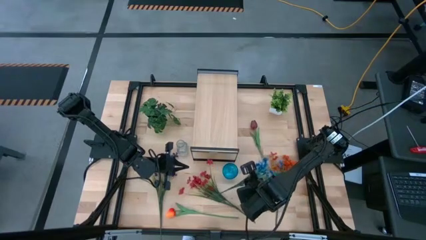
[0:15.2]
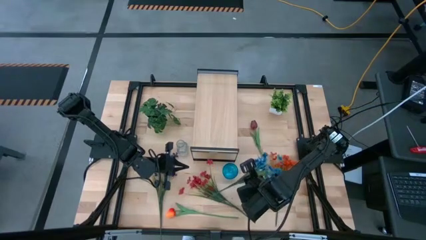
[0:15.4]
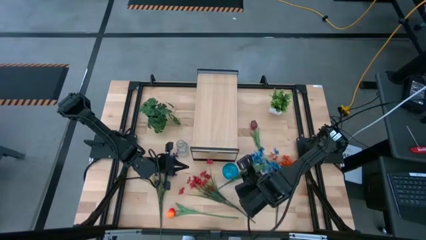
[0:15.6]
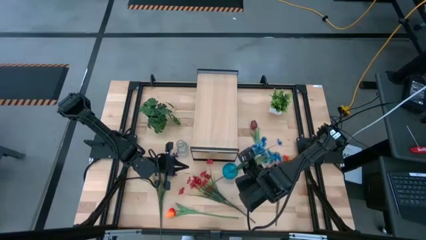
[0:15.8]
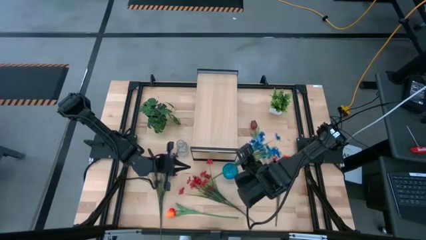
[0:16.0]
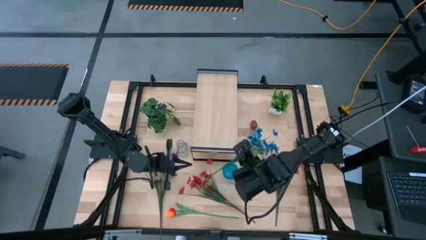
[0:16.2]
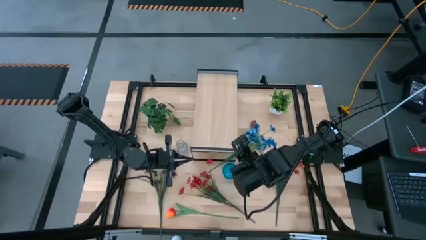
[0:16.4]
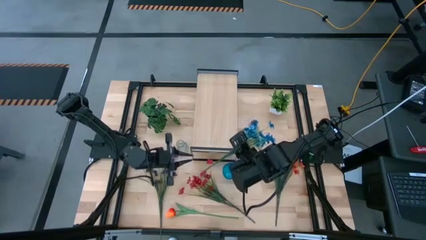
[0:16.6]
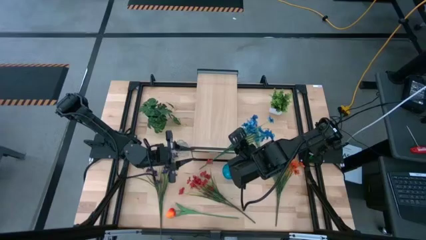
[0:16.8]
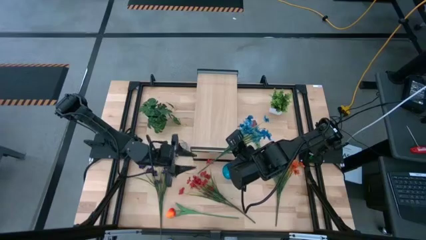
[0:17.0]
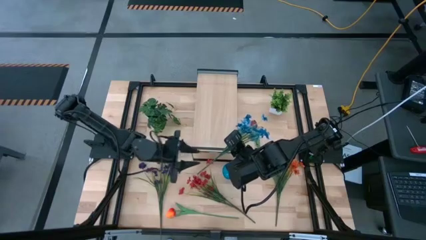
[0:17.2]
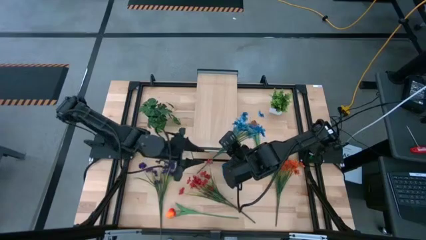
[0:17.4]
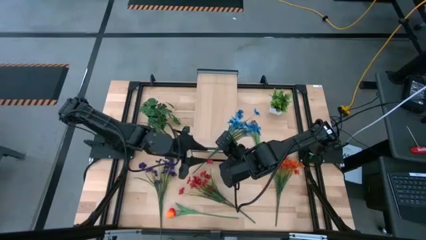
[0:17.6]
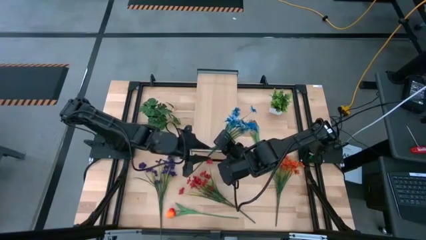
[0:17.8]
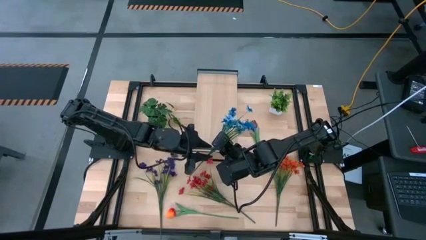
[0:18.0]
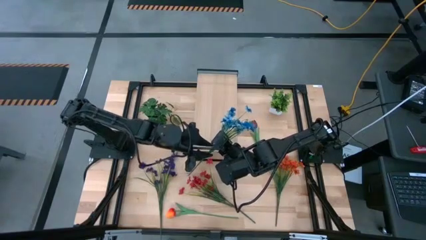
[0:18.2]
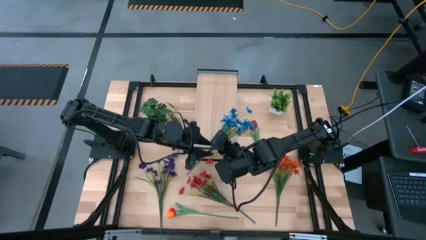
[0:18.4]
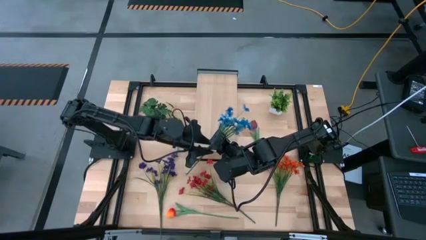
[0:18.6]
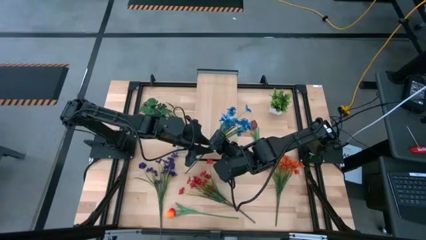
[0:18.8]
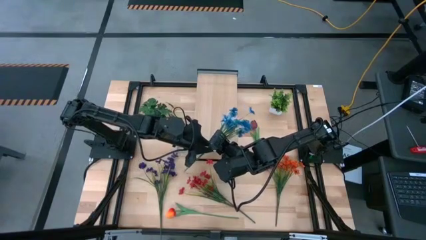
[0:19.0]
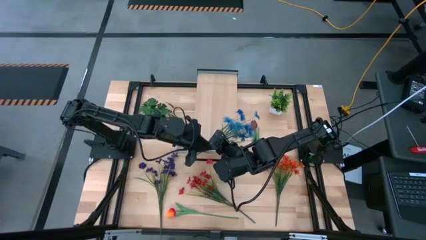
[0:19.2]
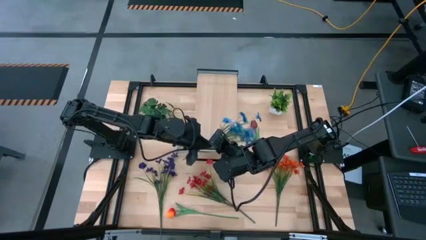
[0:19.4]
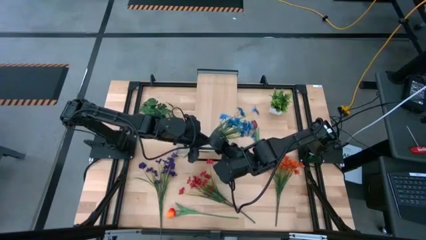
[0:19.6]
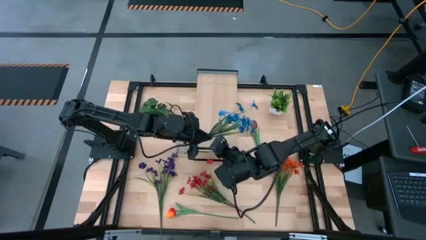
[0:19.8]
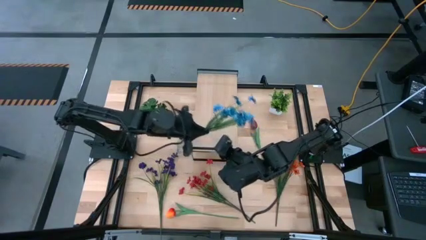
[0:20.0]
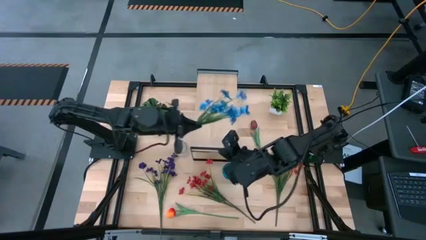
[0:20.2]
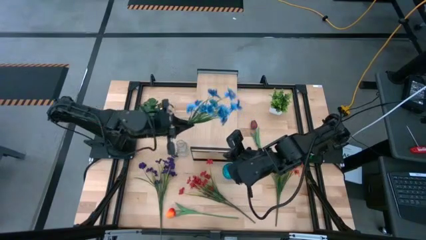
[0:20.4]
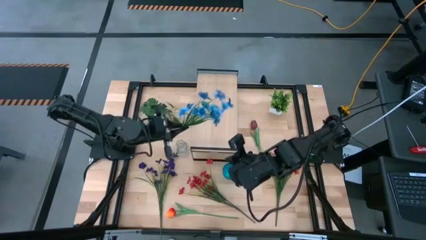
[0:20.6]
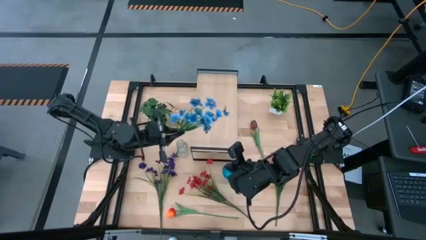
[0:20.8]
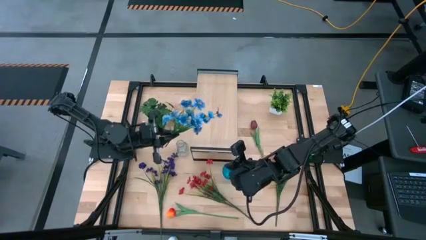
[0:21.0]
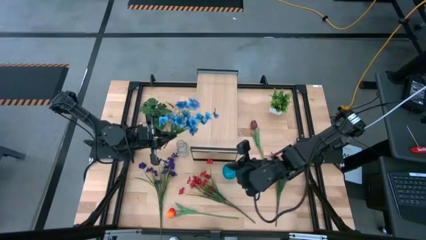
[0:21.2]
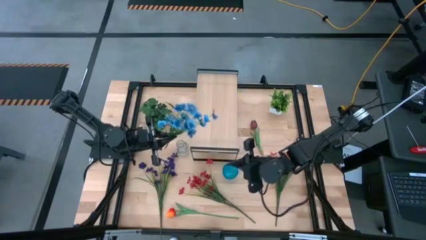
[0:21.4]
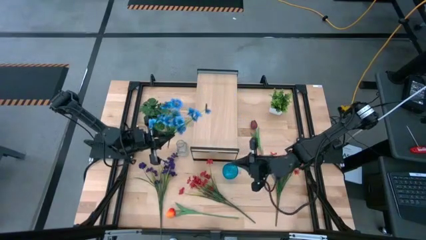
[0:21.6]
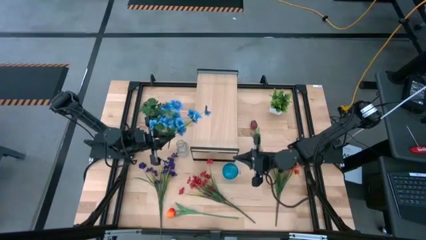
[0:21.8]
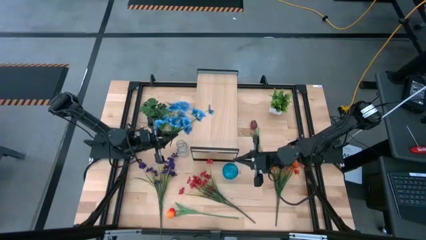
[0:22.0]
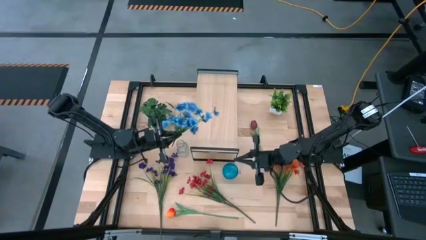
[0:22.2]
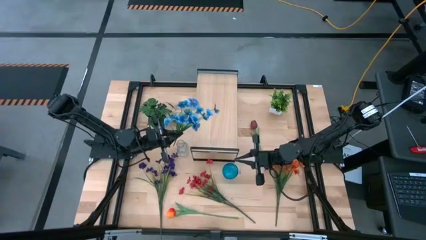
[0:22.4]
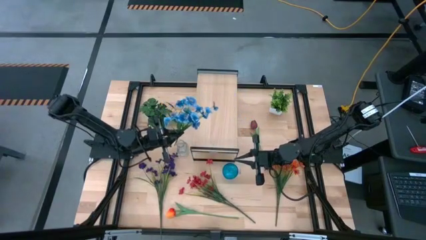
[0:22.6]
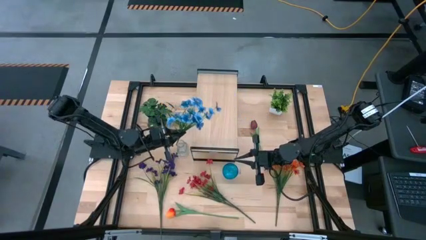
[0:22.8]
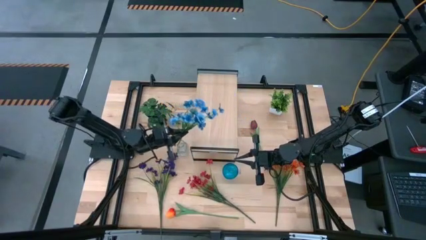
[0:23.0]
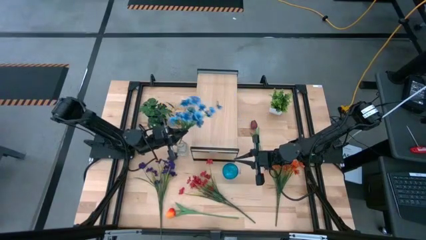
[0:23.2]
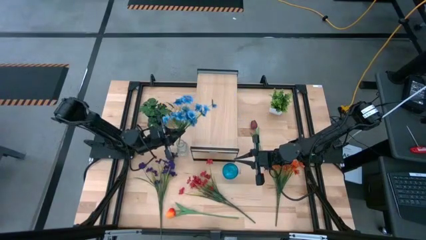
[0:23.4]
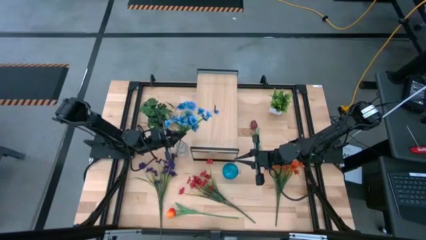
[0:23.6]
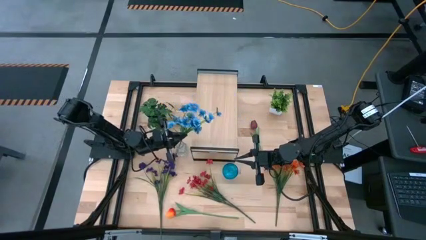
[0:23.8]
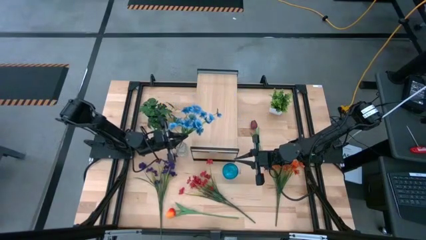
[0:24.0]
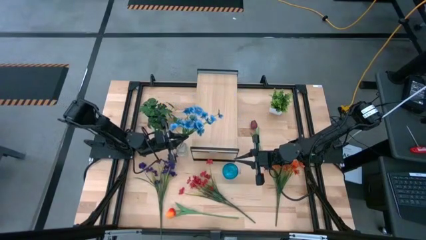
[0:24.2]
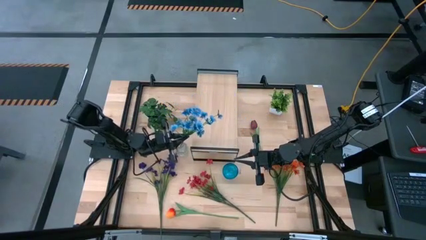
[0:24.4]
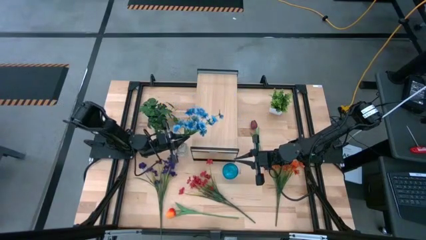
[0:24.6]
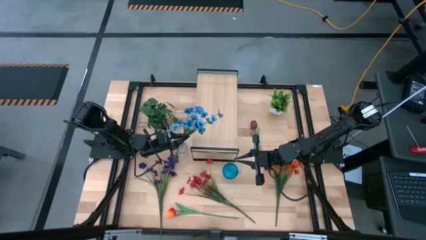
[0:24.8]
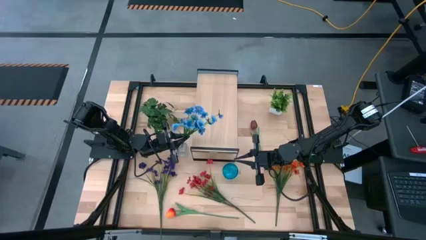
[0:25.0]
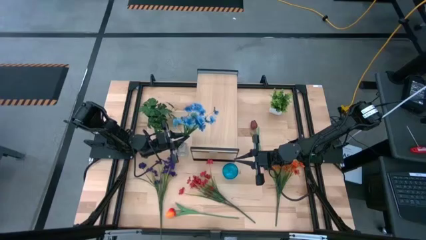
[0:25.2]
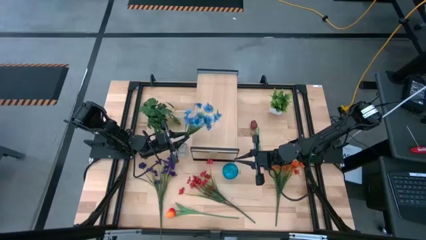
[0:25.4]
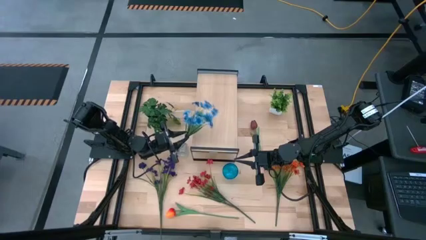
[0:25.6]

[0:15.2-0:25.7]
Task: Pick and place flowers into a vace then onto a shelf
Put the blue flowers into the transparent vase

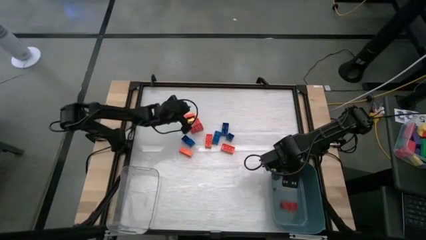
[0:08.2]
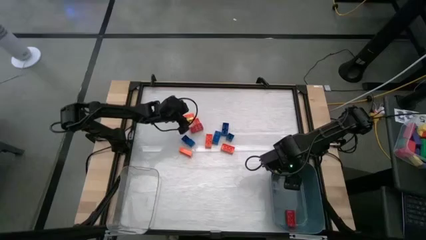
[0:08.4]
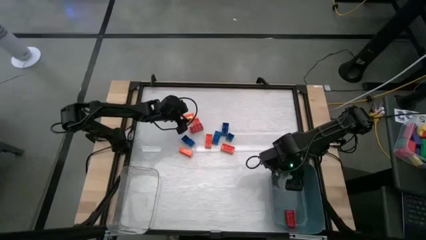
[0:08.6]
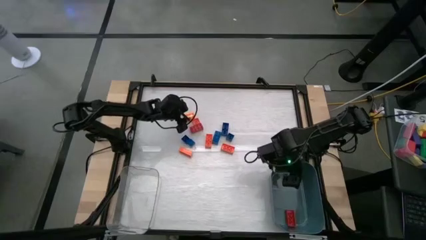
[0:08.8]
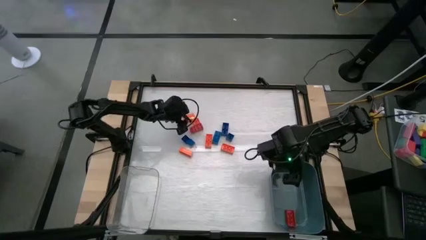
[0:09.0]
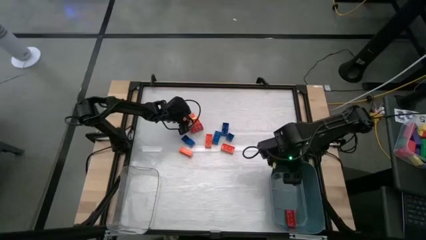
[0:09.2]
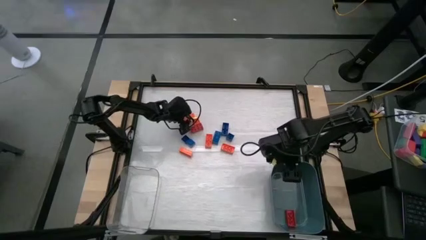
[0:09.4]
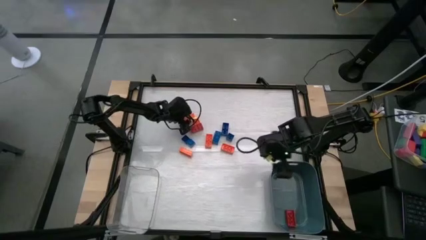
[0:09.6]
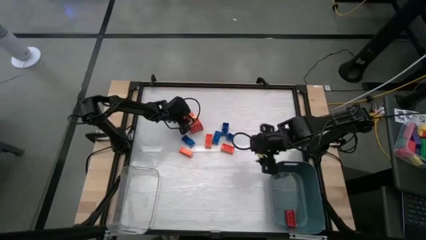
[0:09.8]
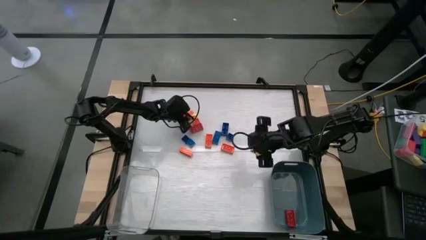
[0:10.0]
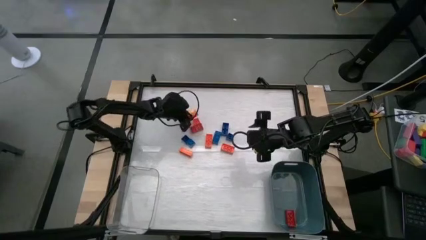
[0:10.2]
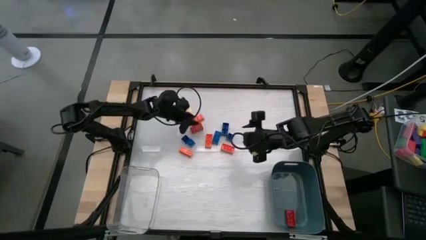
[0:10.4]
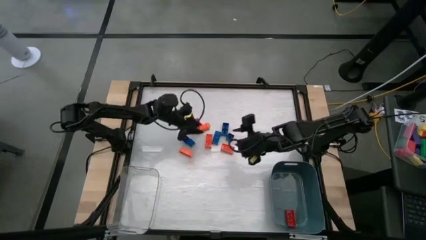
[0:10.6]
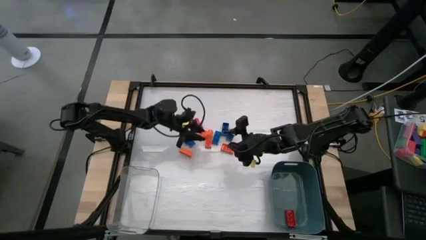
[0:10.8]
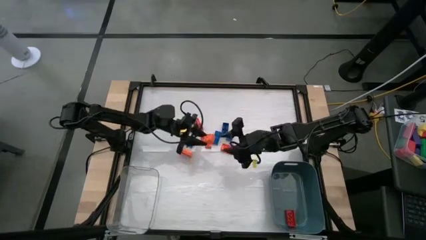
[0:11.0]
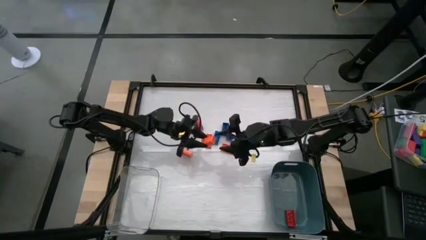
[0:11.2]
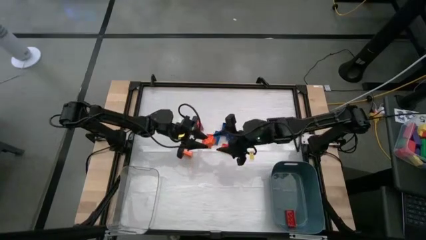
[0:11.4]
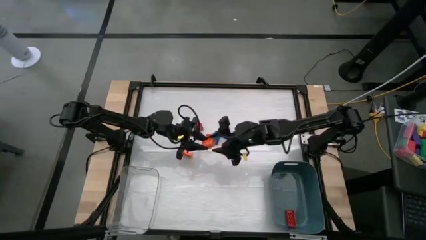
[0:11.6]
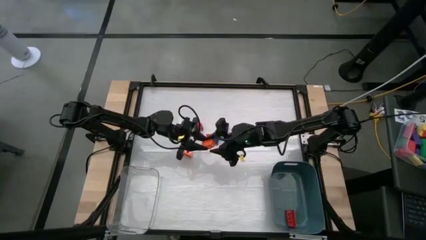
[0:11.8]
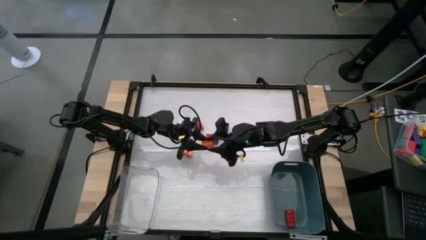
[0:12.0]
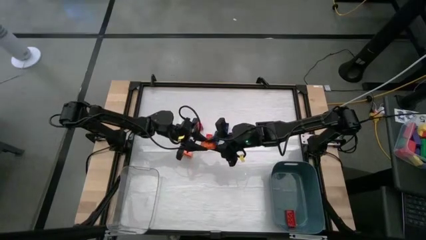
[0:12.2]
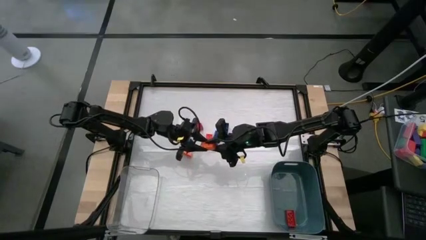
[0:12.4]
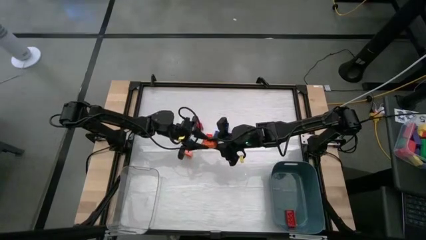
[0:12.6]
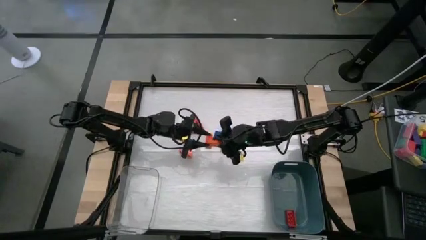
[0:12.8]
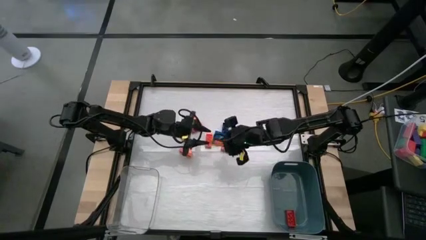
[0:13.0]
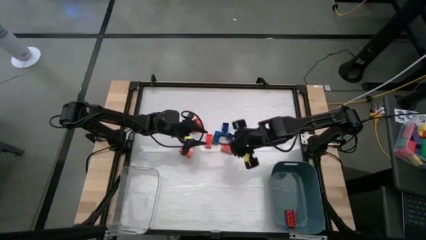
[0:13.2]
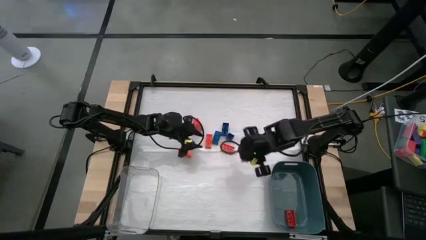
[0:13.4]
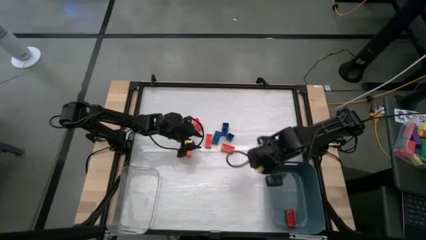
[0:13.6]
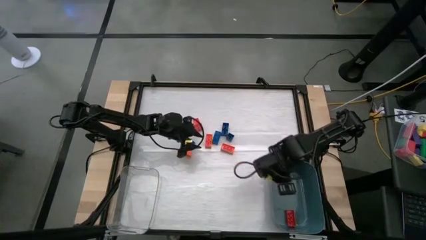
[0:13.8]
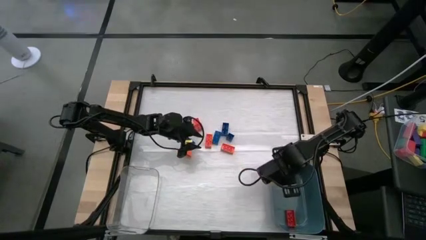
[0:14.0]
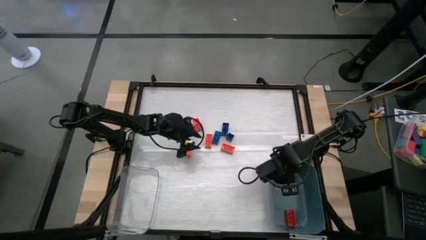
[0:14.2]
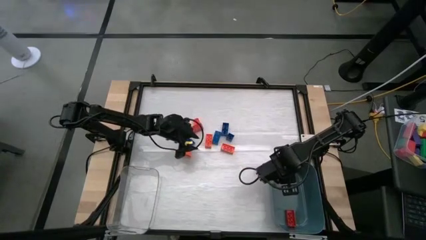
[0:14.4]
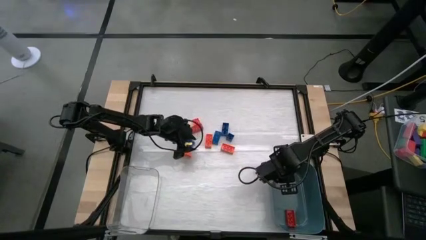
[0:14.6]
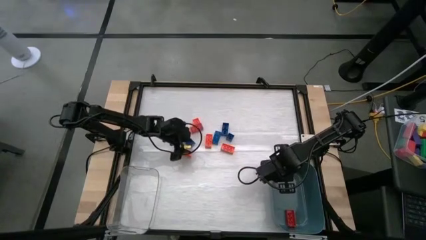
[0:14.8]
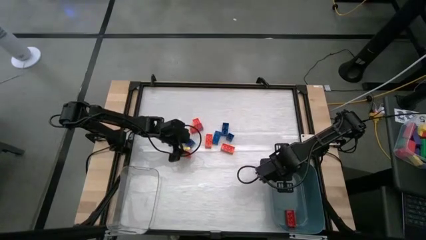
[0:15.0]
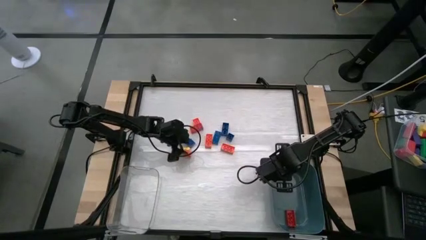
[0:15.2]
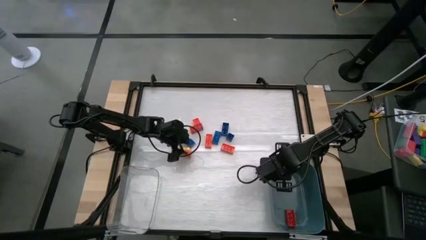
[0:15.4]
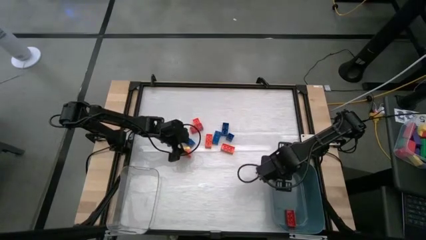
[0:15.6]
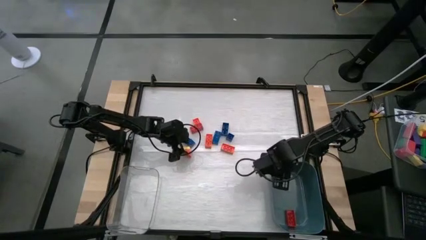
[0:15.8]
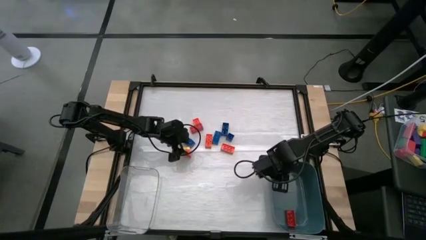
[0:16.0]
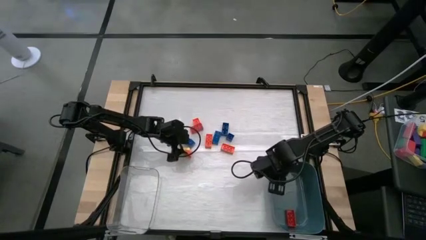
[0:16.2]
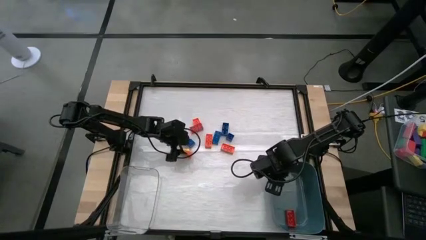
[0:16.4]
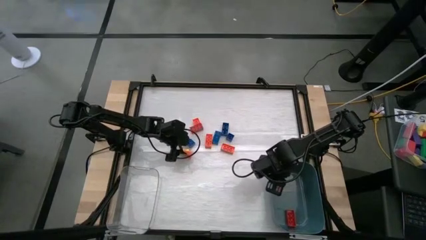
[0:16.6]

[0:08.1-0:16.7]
Task: Sort blocks by size
Put the large orange game piece into the blue bin
